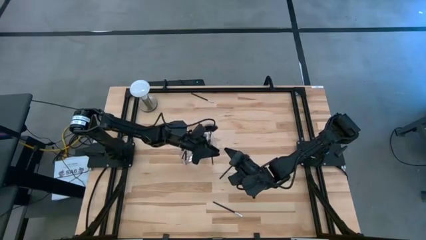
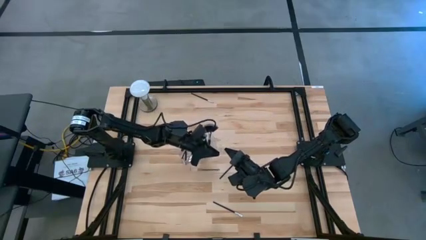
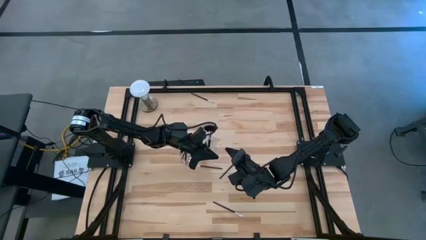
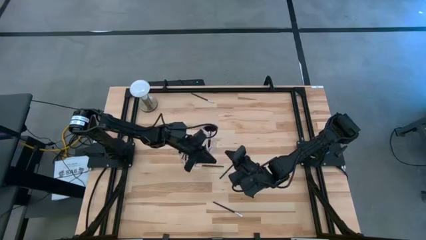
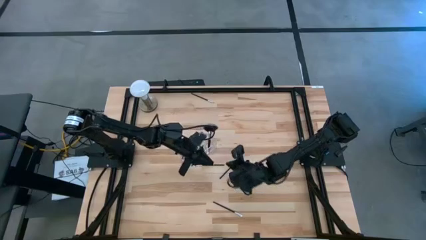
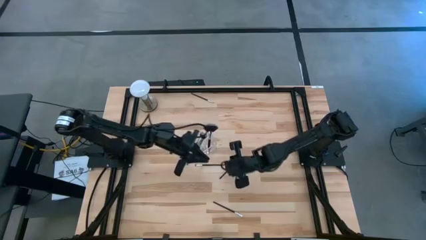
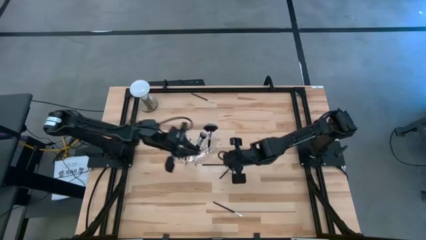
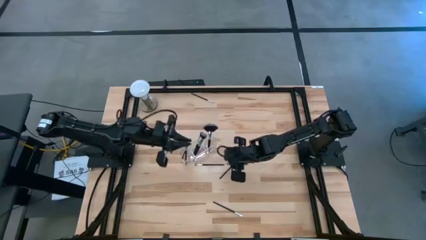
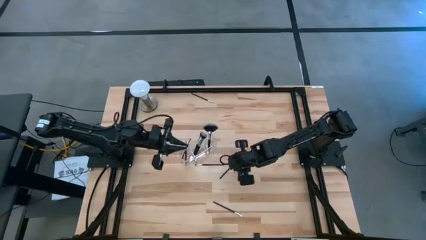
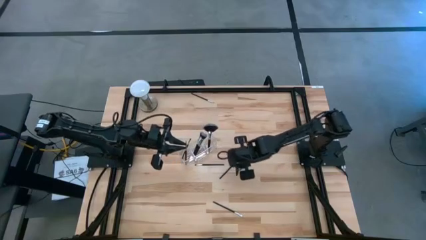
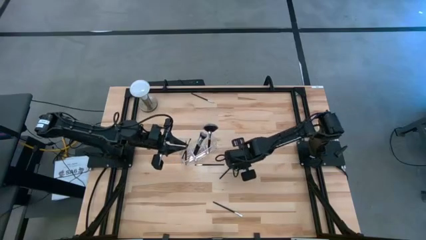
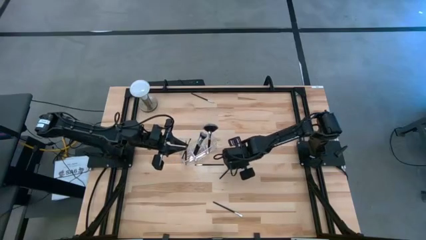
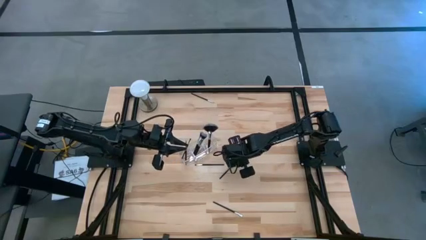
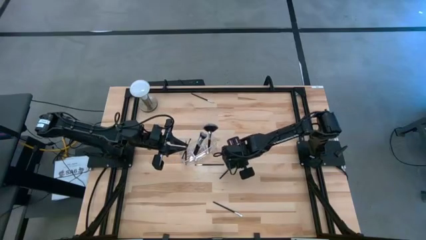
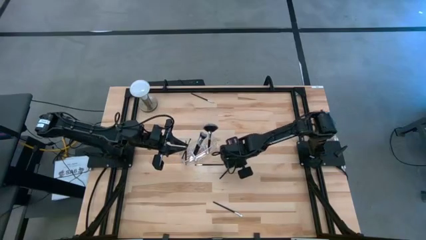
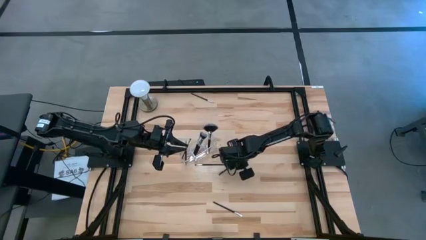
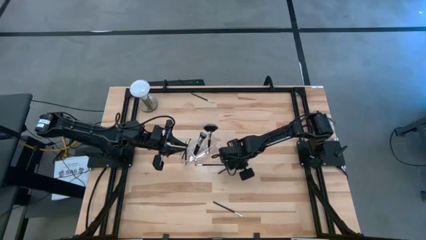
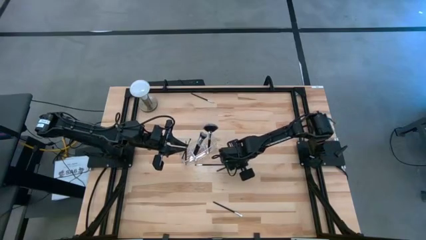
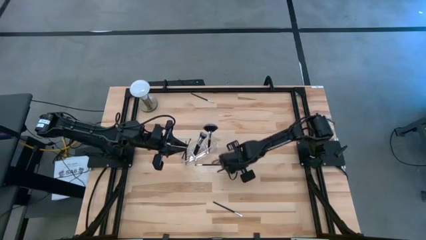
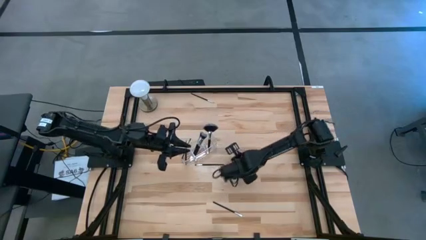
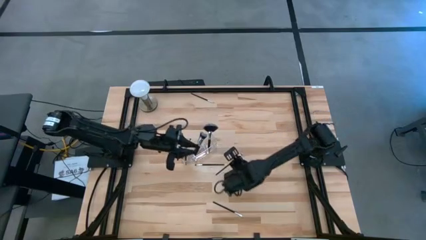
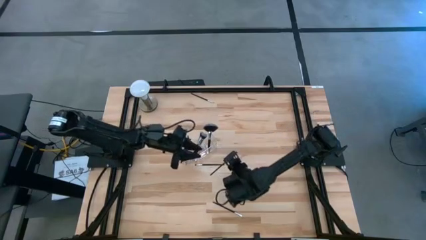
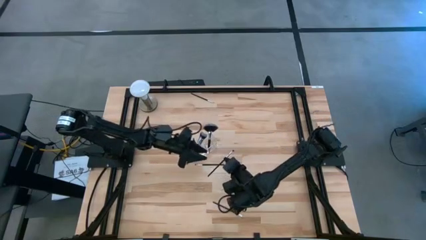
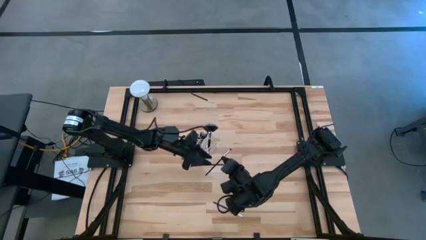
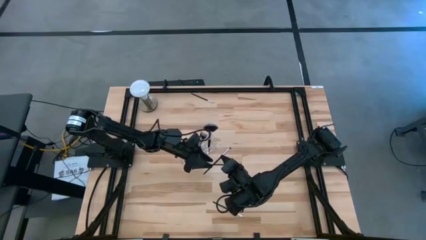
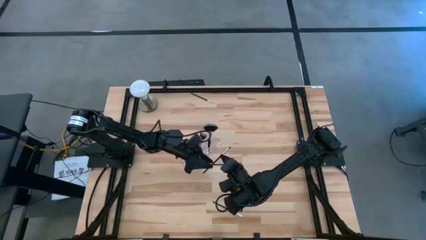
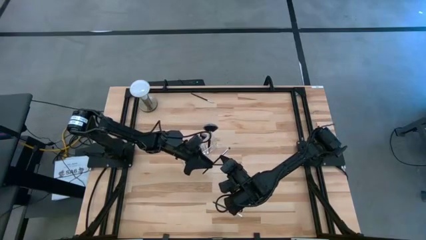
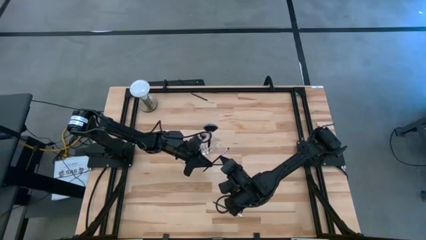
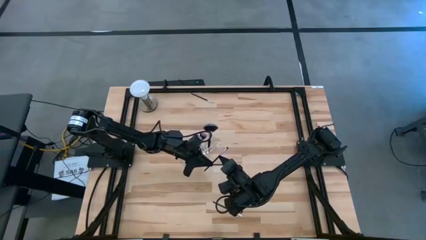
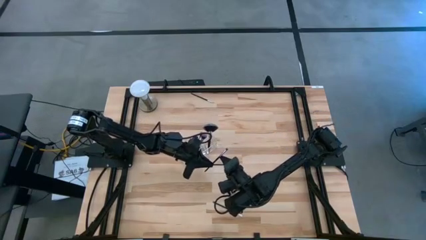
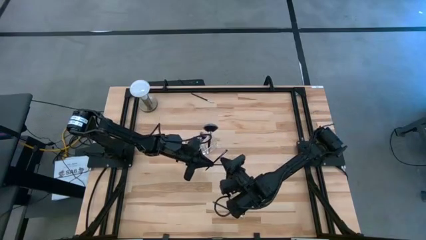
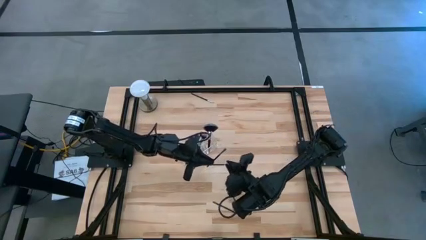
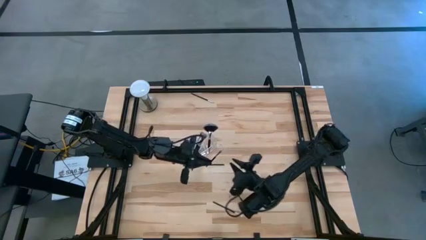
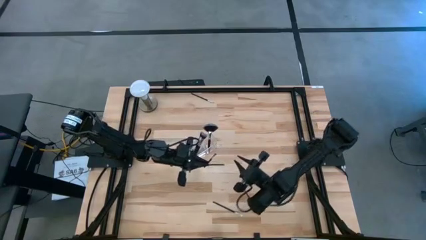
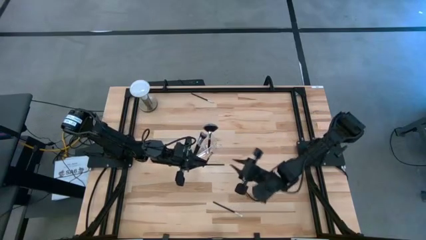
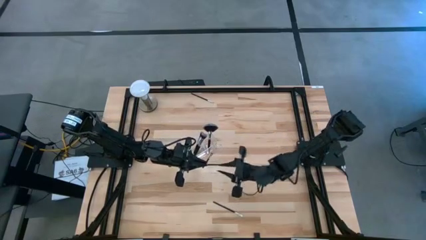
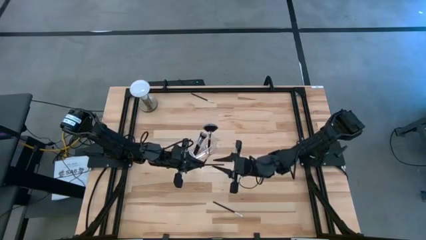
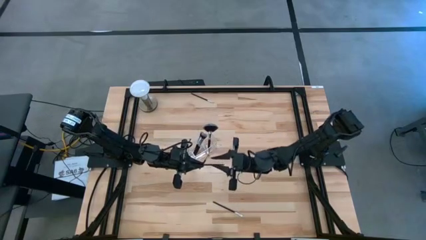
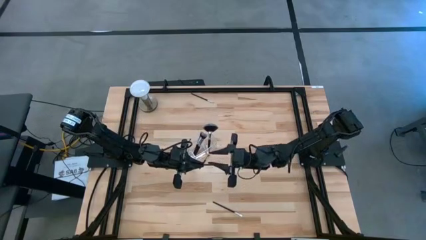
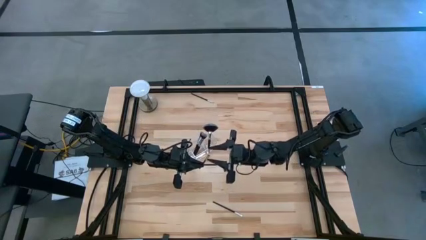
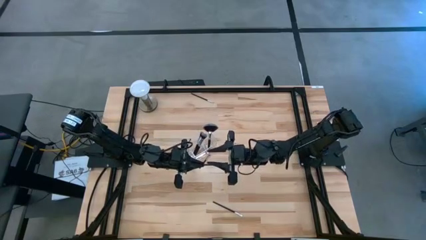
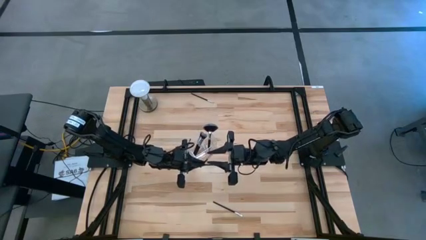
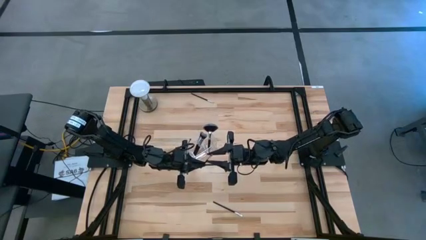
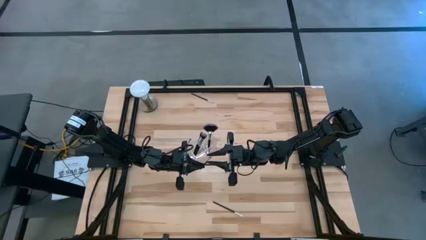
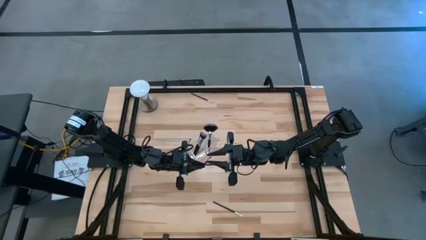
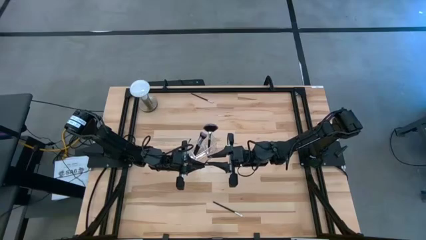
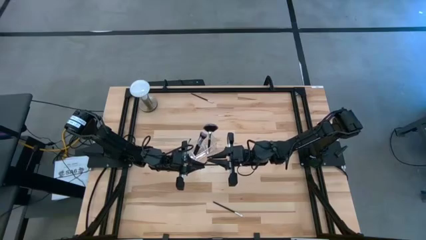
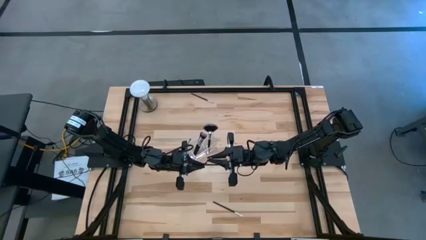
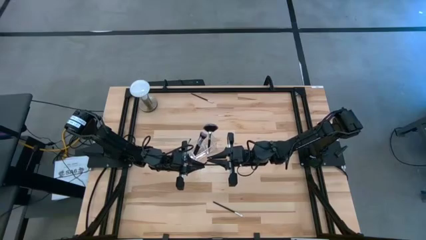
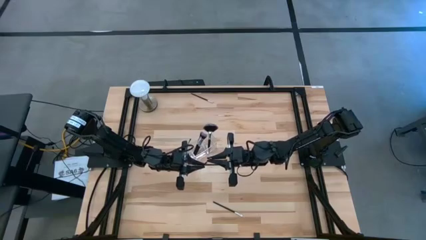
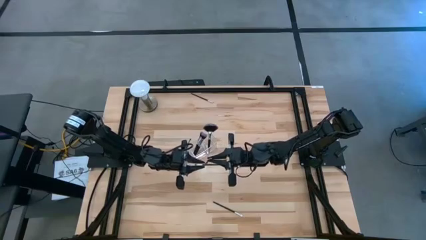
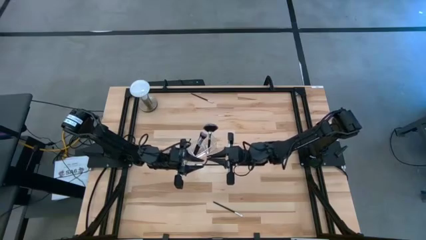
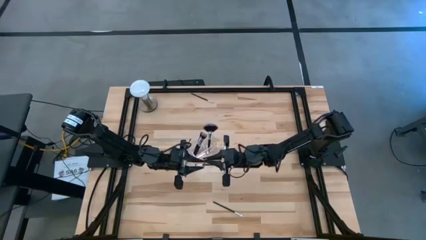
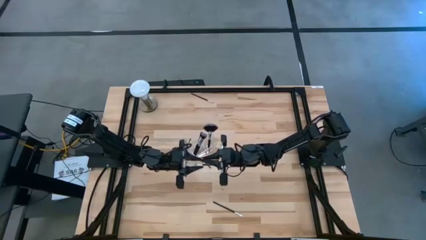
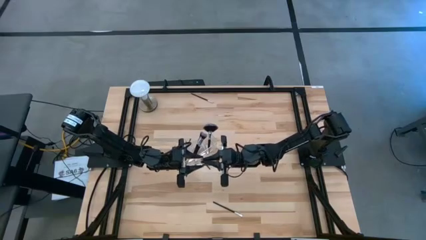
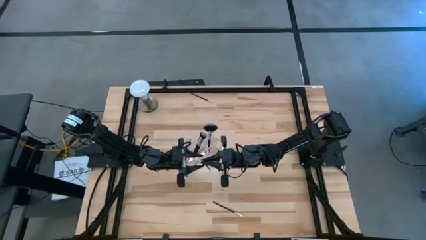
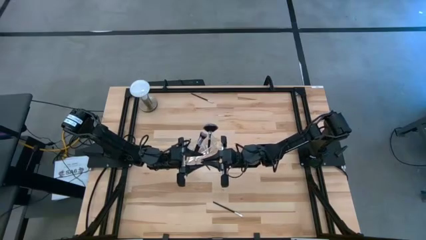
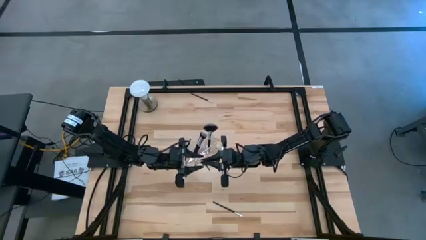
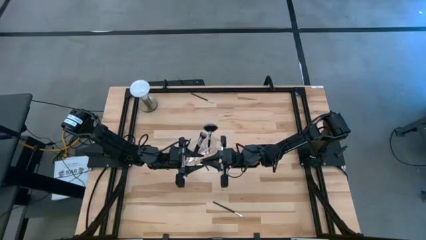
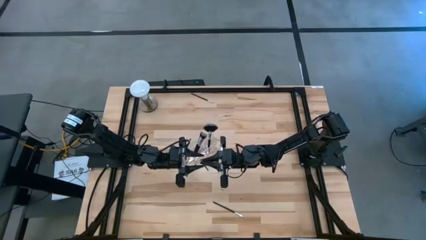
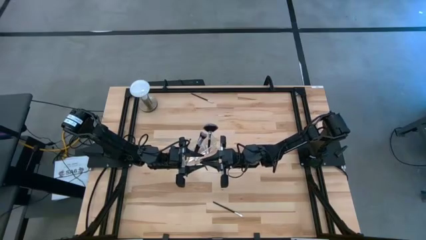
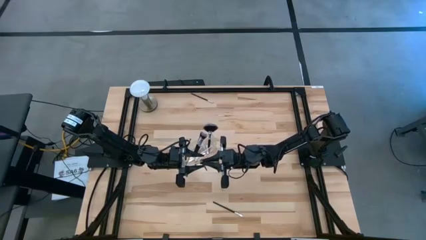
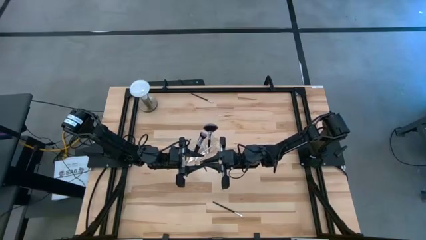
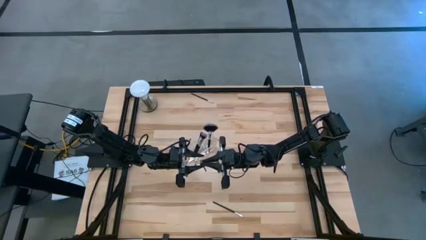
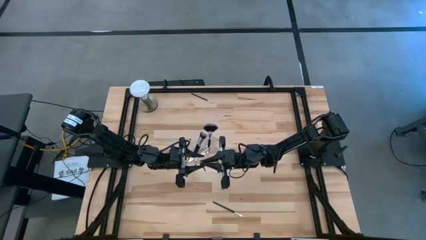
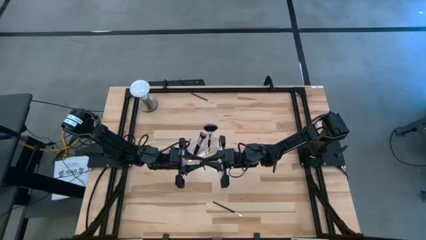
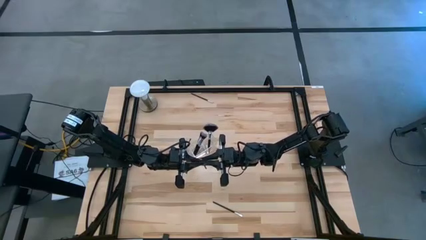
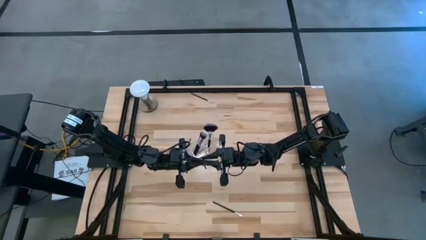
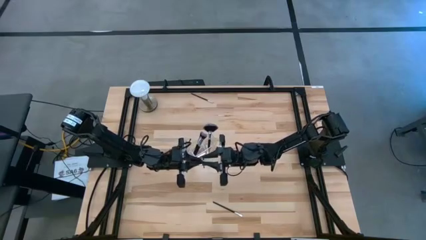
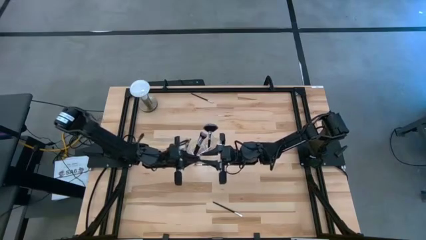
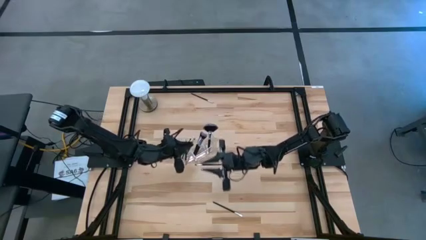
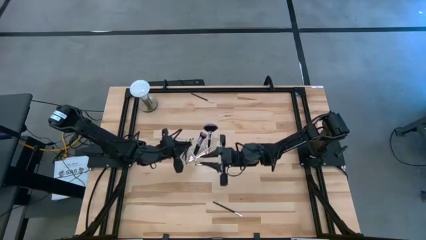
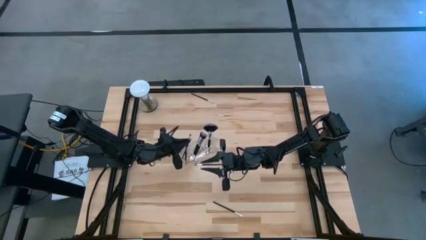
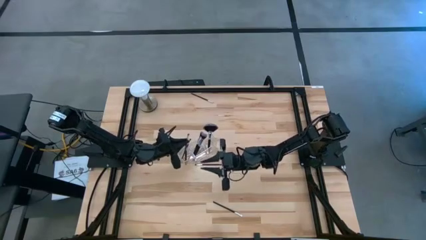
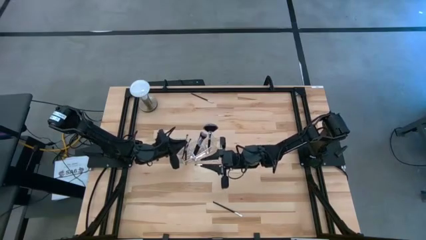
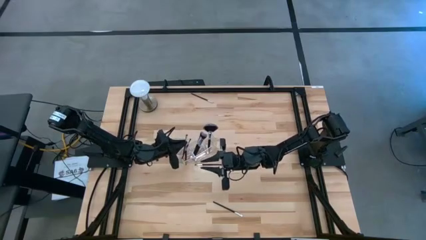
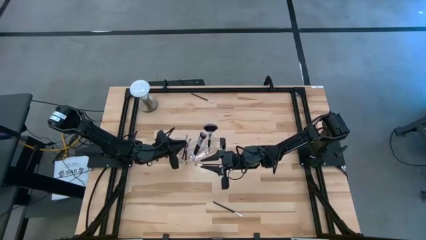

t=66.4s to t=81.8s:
Task: Put items in baskets/containers
Put the eyeshadow brush into the left section of the transparent organizer
